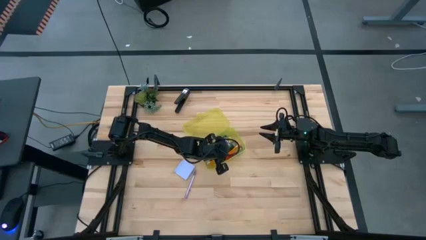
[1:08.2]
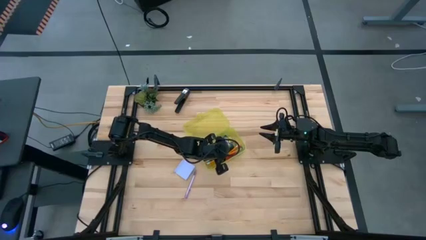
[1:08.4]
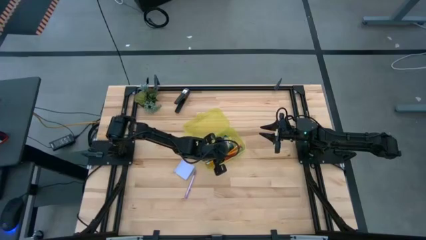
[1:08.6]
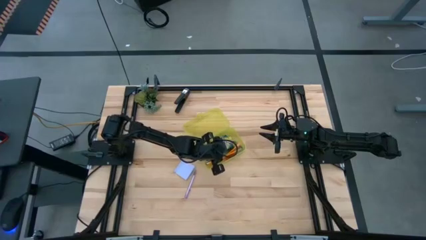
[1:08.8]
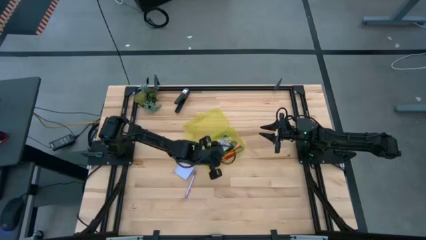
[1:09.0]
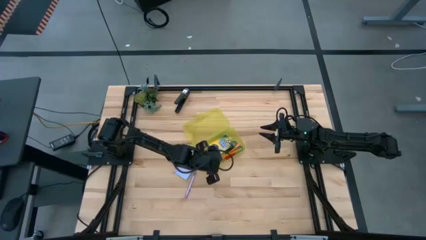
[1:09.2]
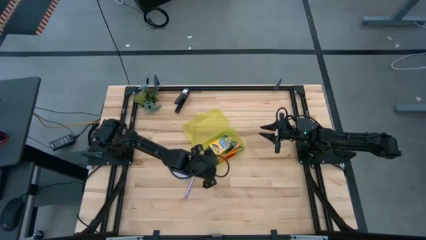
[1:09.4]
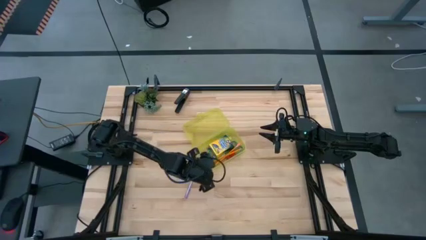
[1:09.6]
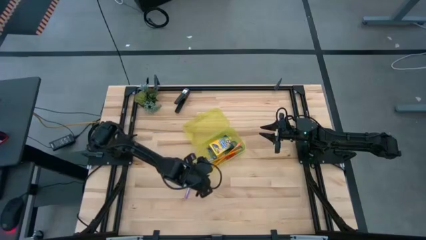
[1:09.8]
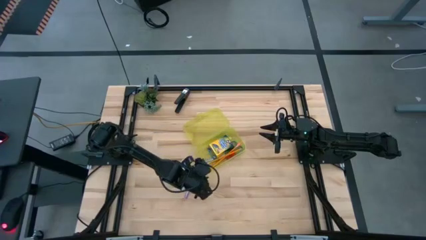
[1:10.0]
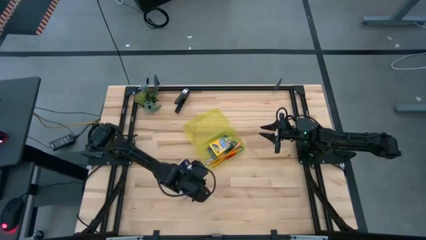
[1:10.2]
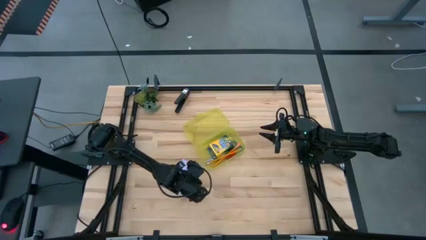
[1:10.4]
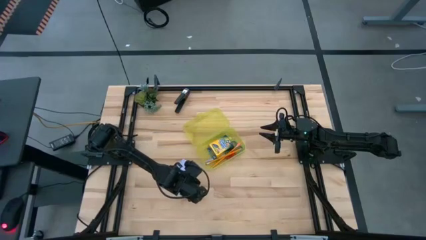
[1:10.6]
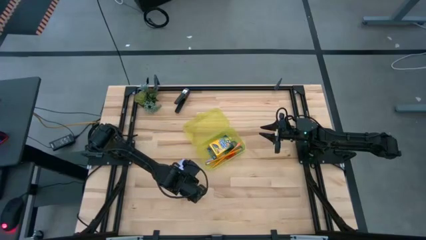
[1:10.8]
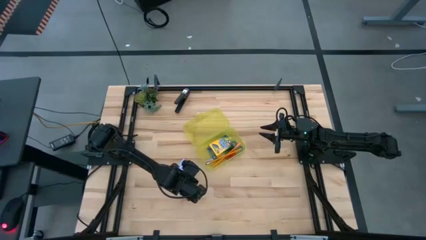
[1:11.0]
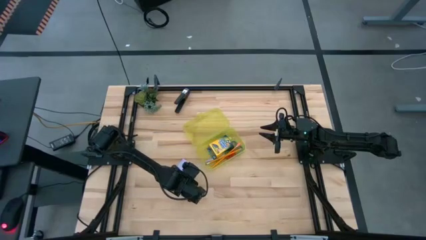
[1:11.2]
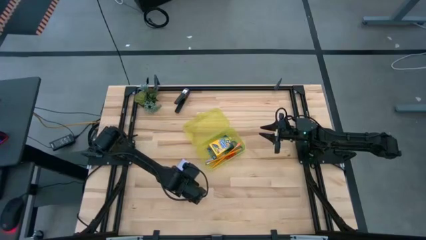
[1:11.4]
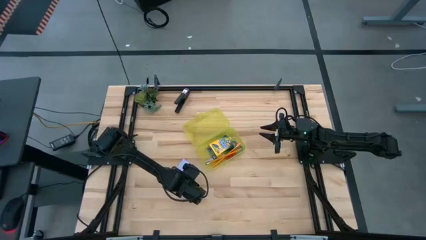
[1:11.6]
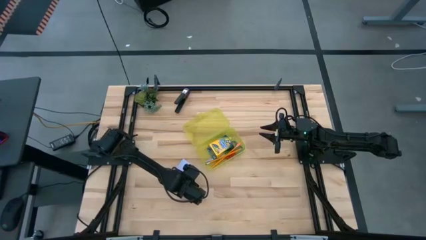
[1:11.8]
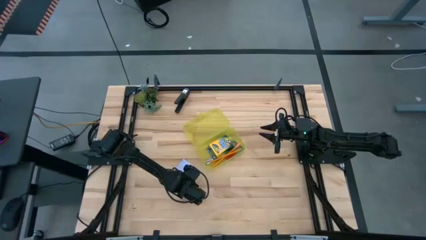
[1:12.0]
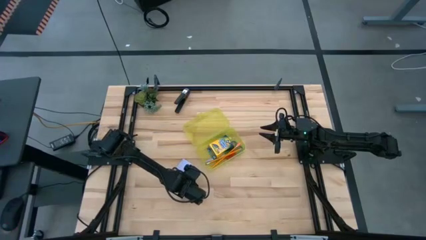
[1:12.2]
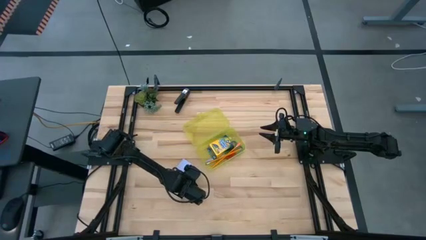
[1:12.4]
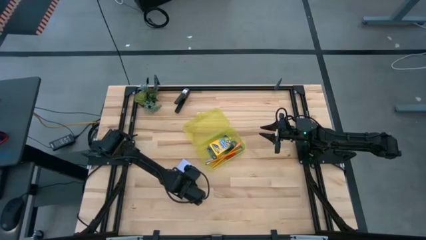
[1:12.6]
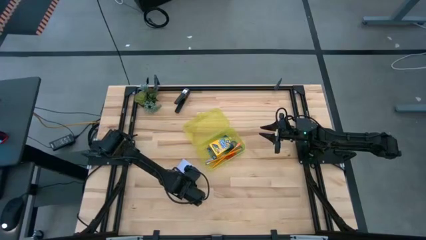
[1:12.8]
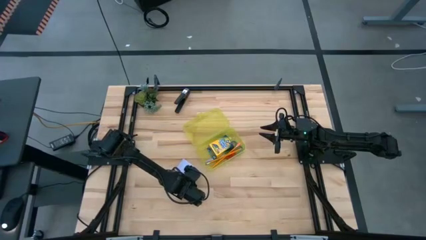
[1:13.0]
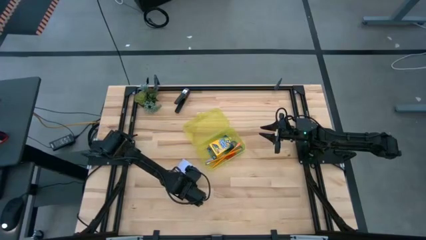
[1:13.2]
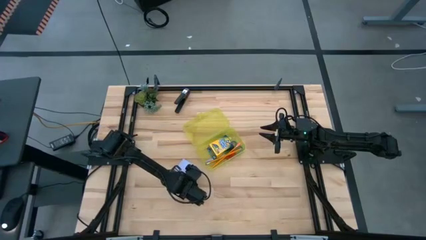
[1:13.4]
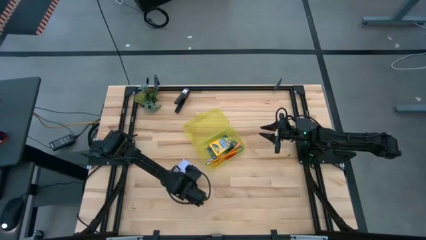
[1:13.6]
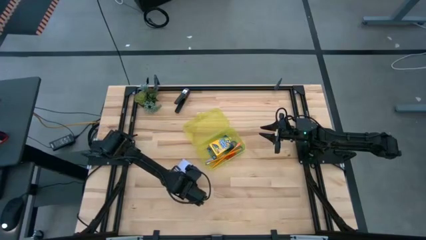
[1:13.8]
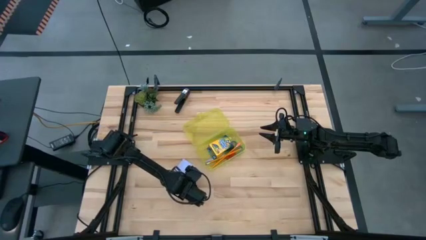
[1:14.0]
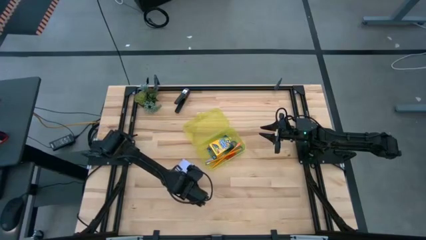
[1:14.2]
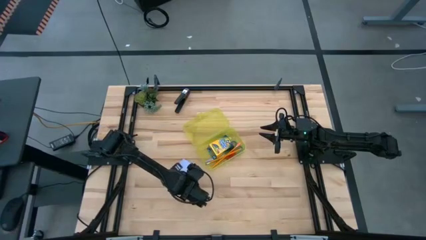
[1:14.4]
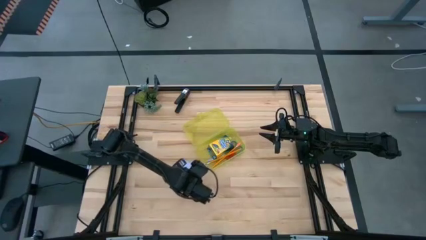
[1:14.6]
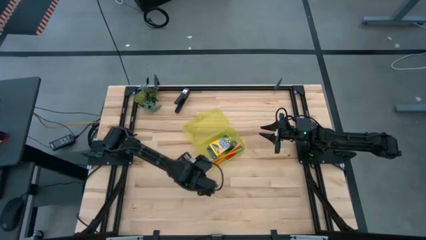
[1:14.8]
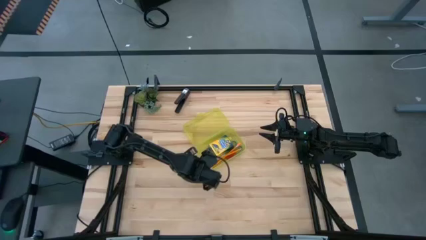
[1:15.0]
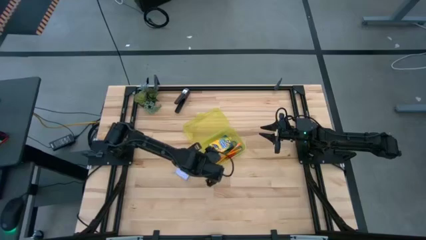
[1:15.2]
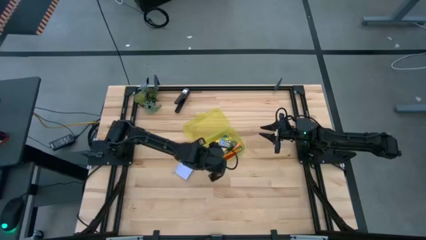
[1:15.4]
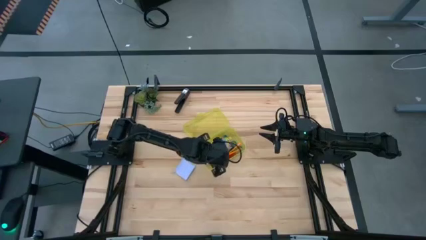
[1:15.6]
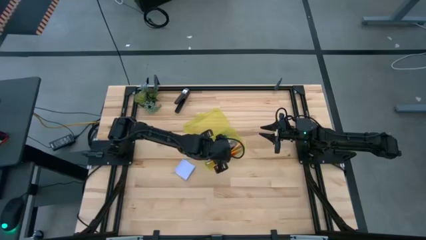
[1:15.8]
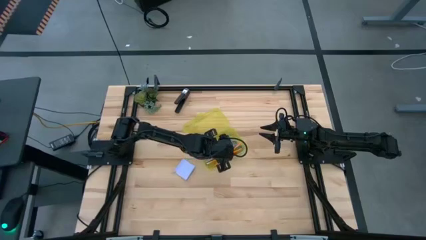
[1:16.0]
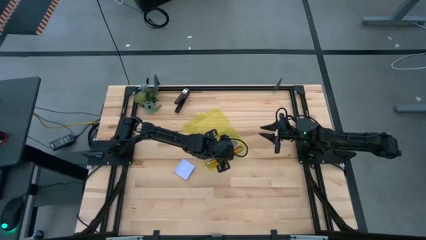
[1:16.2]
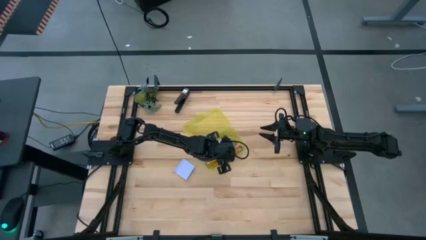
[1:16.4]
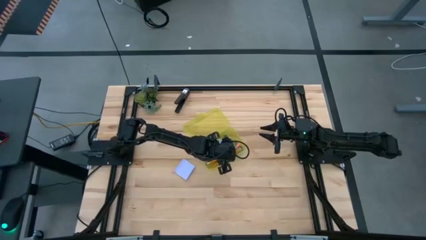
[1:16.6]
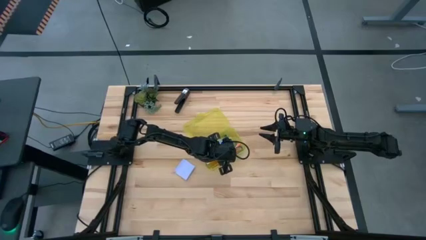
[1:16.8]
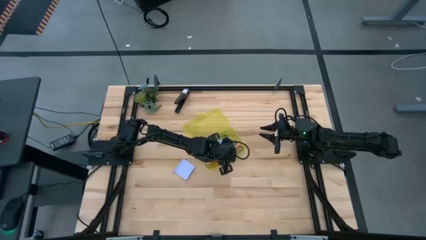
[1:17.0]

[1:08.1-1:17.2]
Task: Pack school essentials
Put the purple pen into the yellow supply box

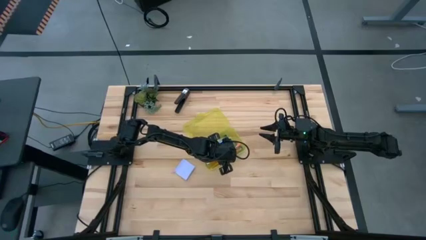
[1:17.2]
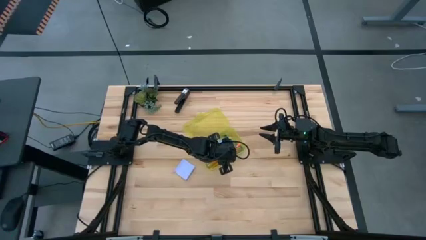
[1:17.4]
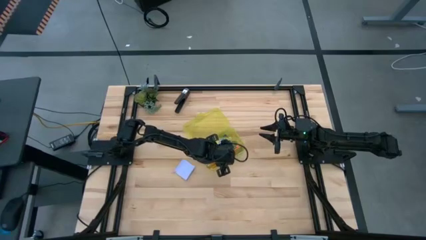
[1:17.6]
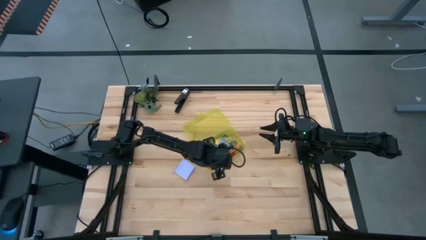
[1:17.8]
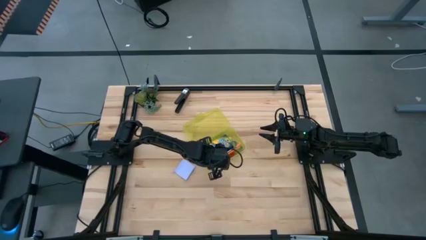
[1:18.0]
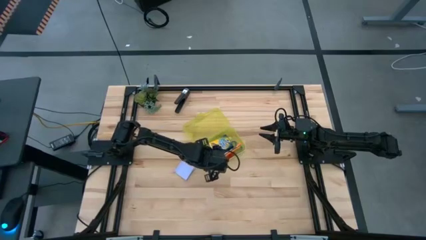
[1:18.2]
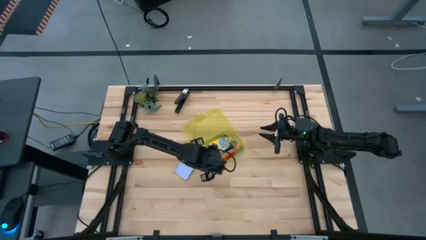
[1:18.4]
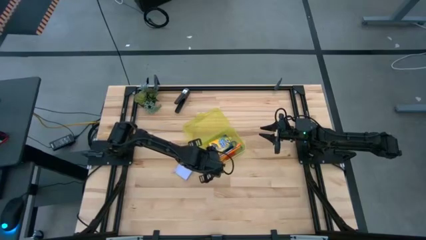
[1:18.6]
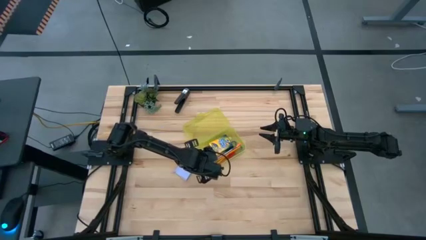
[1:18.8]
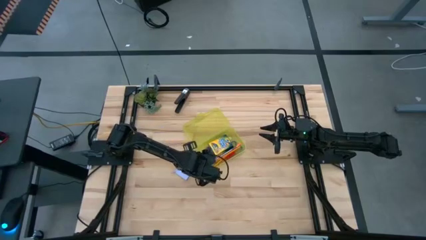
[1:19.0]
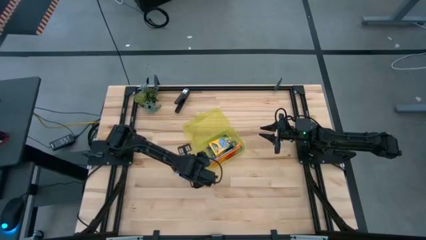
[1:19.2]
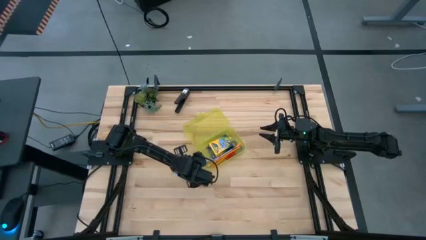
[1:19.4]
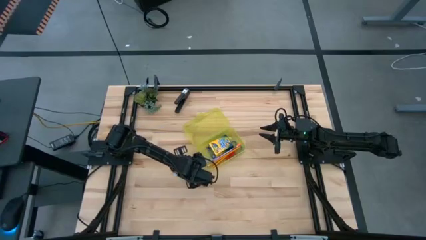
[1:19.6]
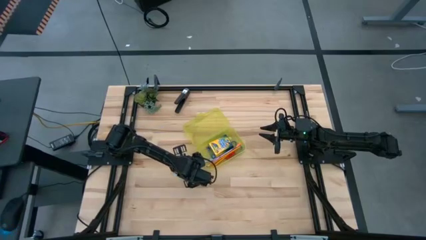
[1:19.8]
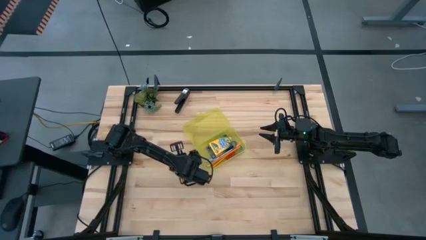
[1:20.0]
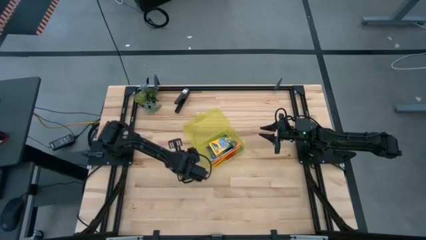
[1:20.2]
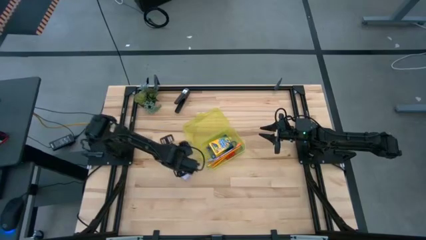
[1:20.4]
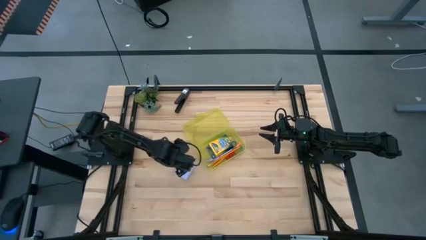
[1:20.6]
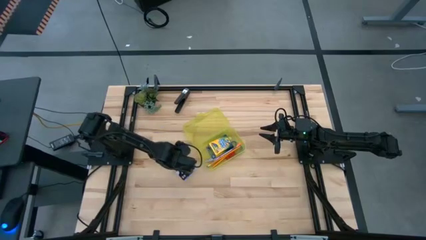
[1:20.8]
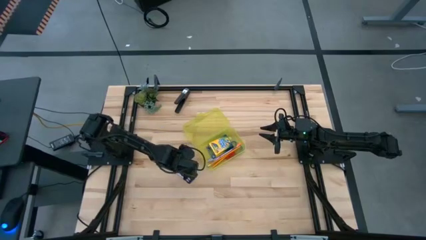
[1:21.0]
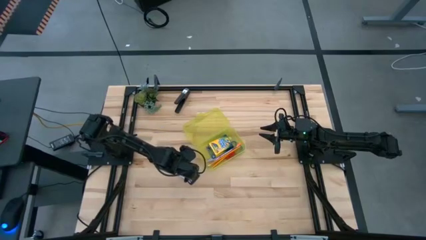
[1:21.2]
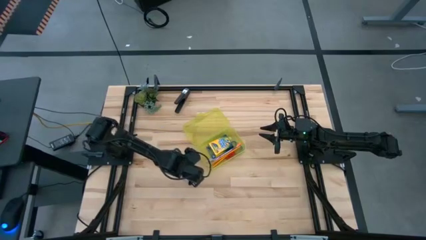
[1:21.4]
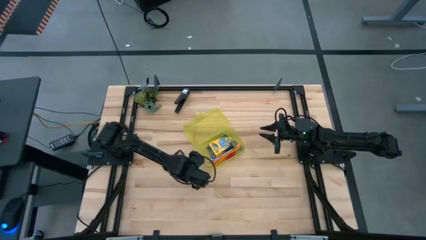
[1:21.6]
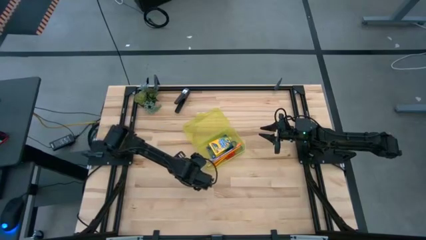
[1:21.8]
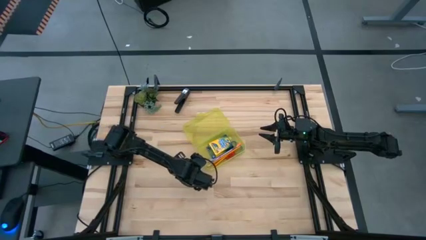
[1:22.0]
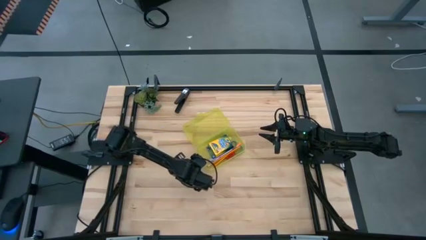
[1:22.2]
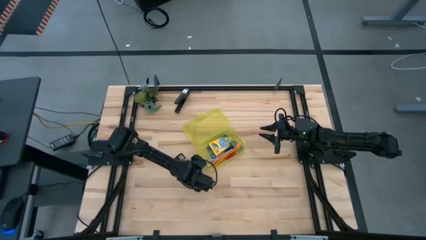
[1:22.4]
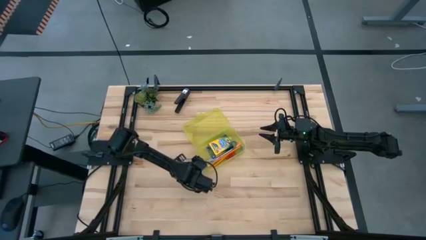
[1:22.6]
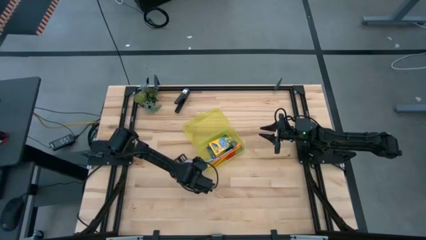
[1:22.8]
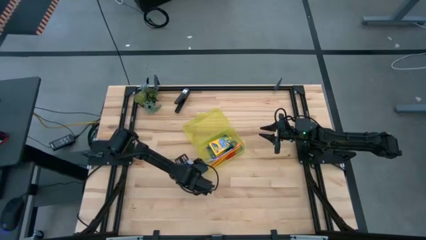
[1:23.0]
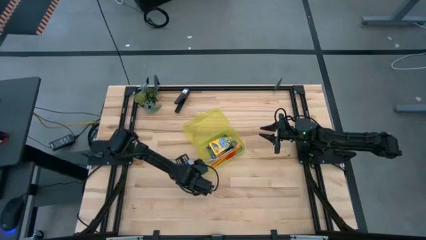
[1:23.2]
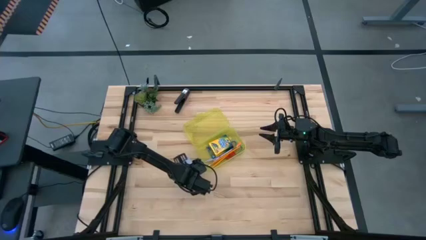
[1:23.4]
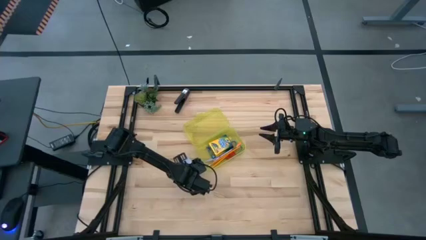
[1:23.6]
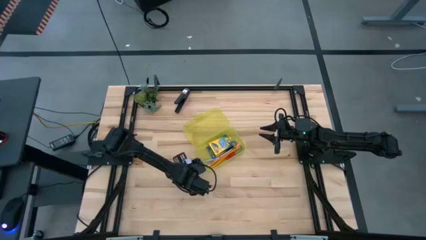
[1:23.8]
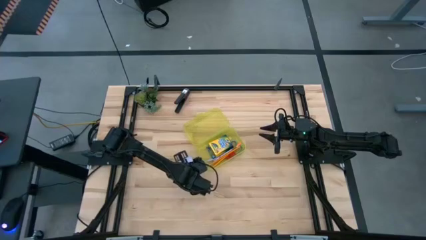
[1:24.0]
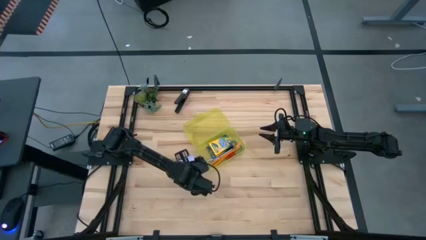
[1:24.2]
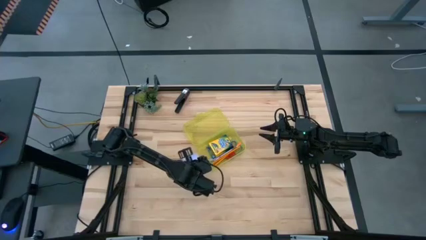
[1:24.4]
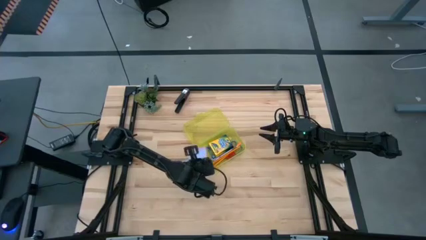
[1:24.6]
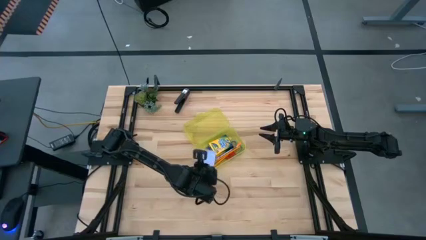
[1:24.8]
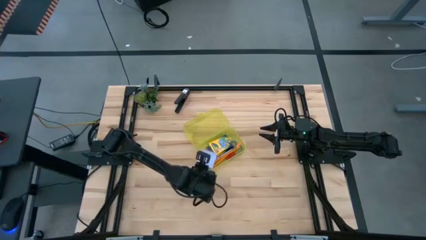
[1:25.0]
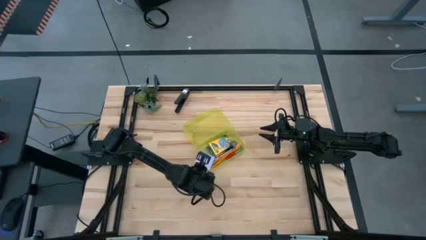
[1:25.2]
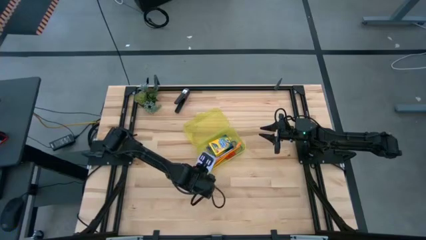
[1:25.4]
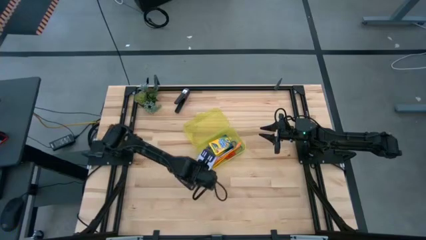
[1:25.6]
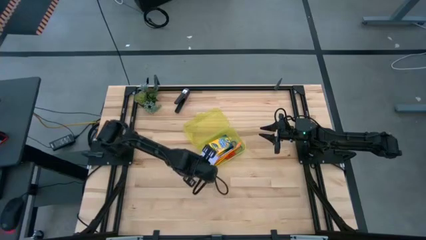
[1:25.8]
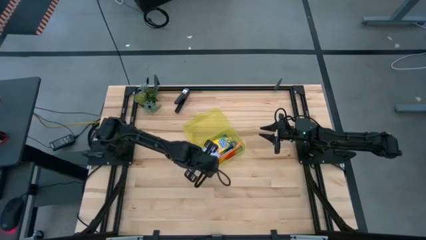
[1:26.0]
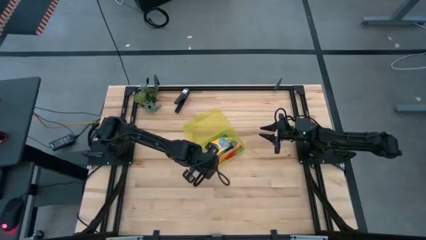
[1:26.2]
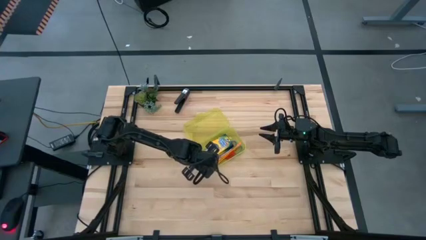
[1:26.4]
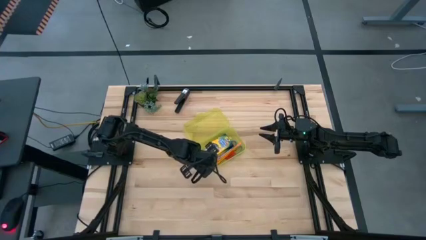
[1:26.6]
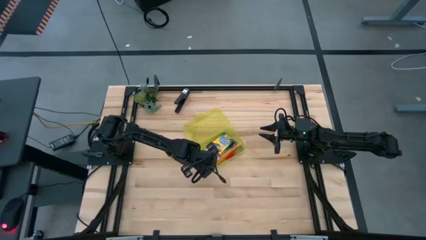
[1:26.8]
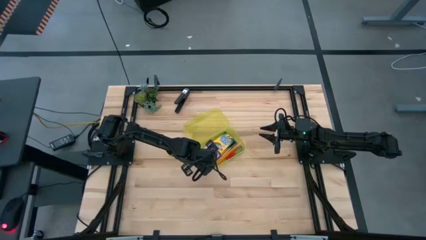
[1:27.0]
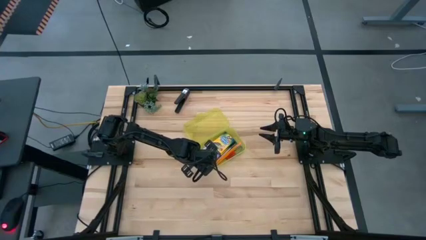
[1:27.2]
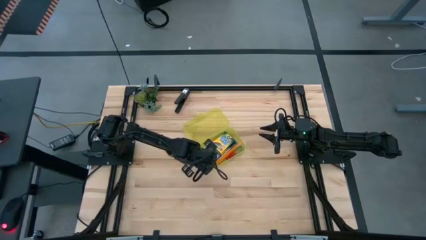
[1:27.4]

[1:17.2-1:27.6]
Put the blue sticky notes into the yellow supply box
